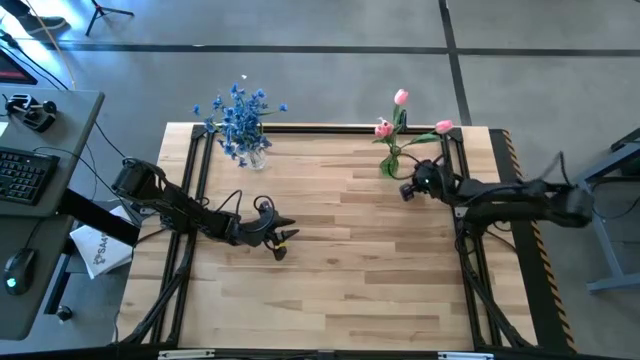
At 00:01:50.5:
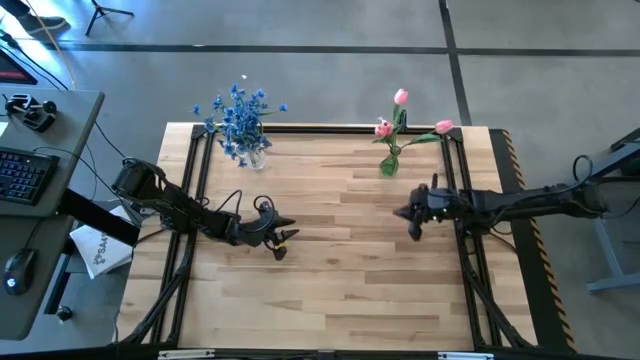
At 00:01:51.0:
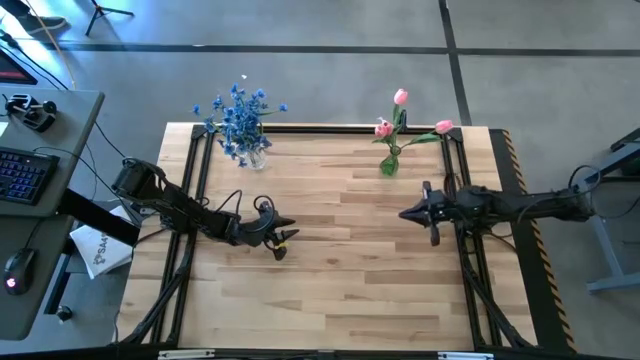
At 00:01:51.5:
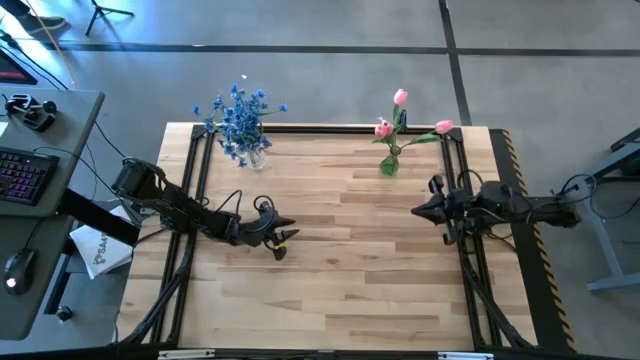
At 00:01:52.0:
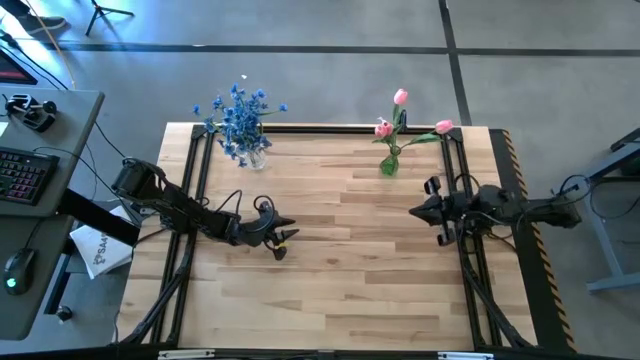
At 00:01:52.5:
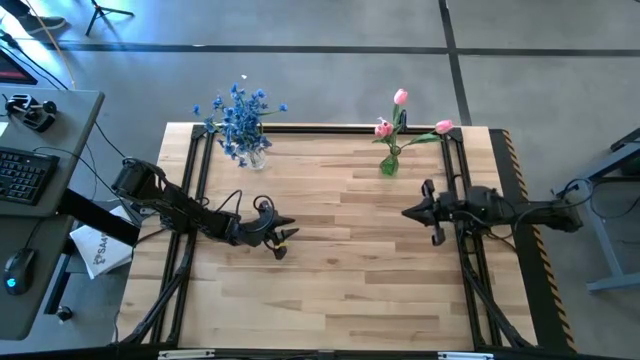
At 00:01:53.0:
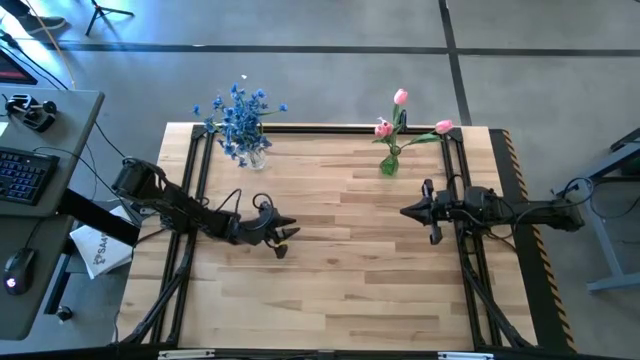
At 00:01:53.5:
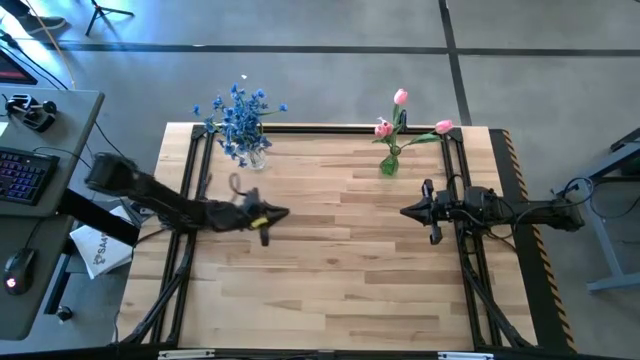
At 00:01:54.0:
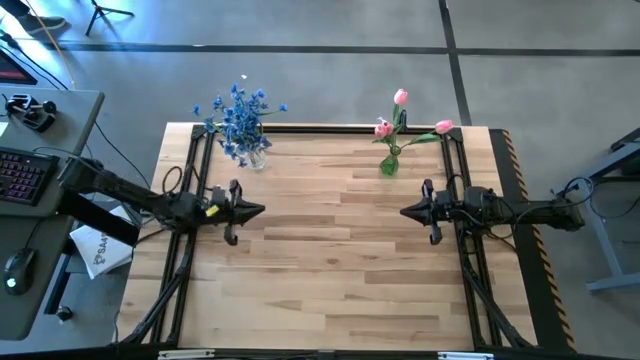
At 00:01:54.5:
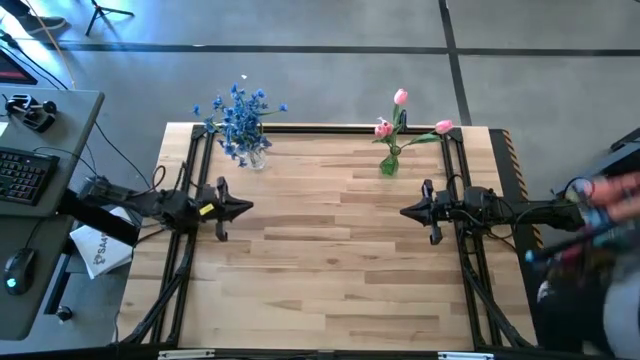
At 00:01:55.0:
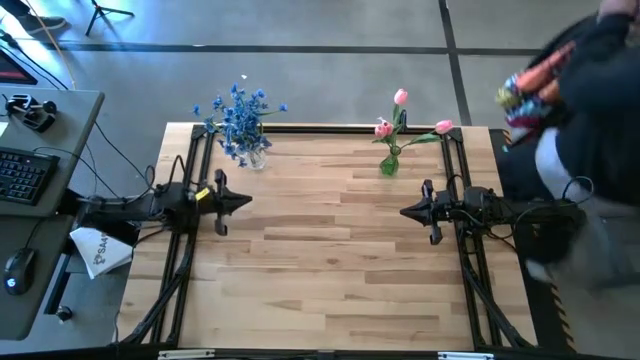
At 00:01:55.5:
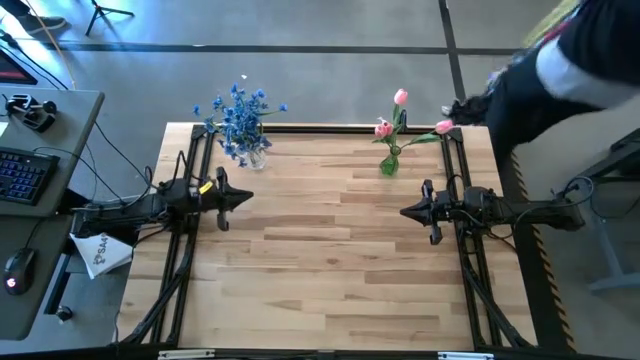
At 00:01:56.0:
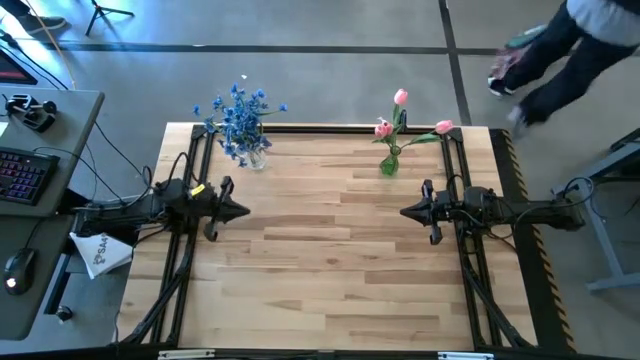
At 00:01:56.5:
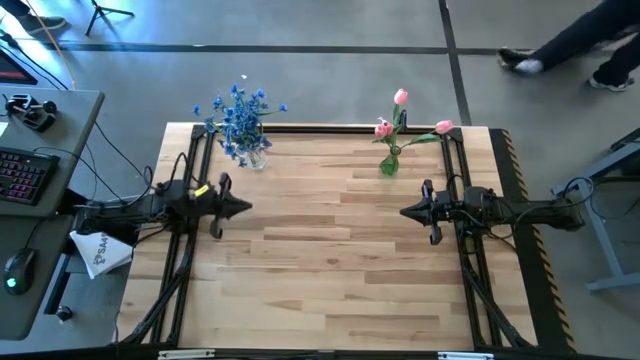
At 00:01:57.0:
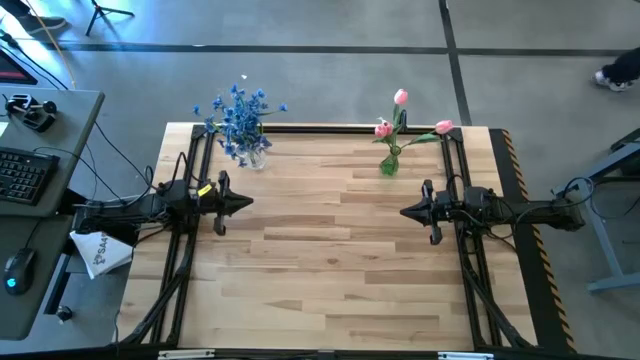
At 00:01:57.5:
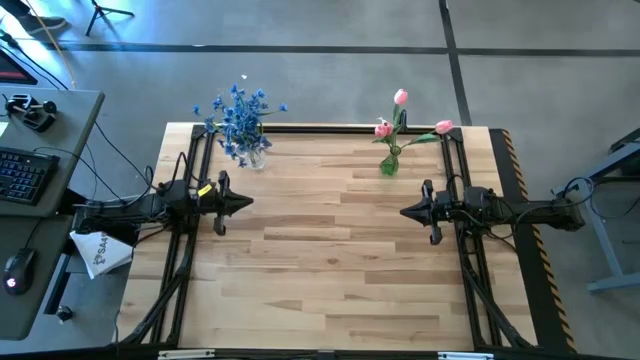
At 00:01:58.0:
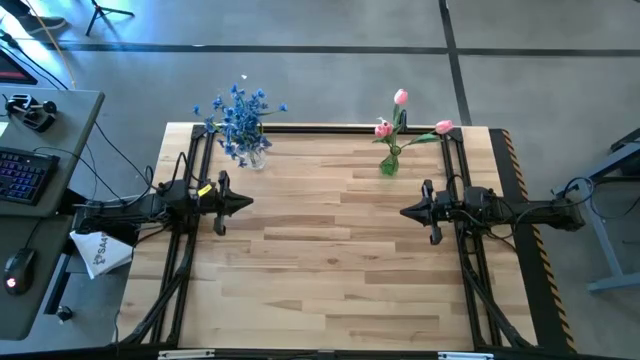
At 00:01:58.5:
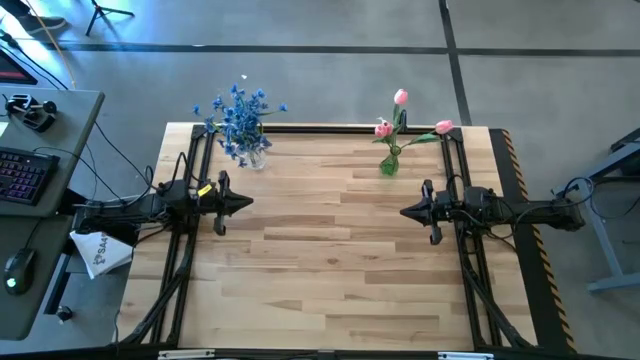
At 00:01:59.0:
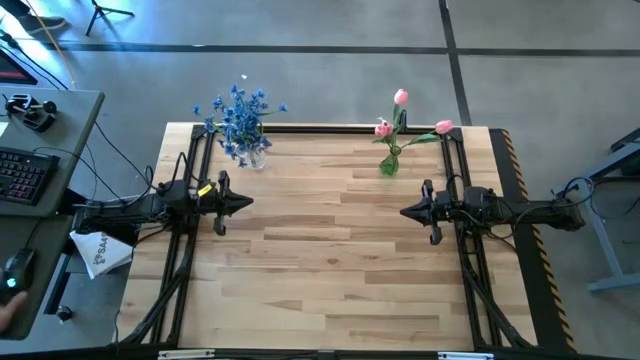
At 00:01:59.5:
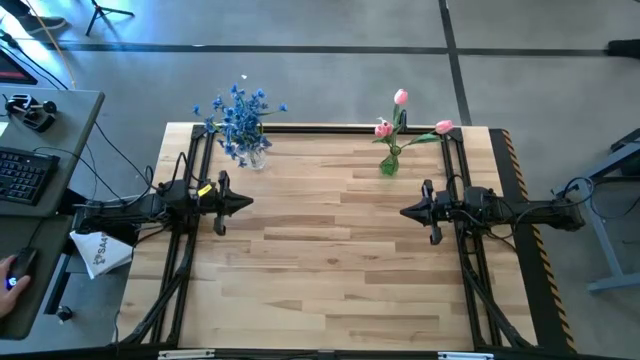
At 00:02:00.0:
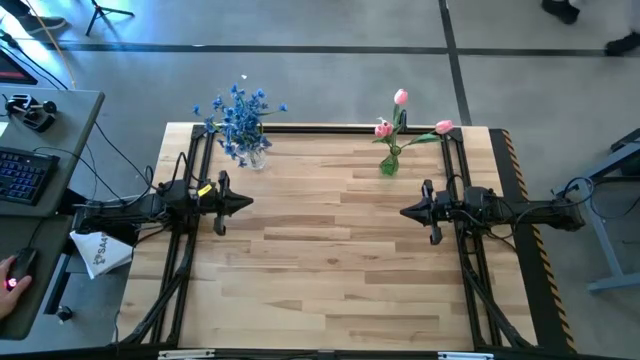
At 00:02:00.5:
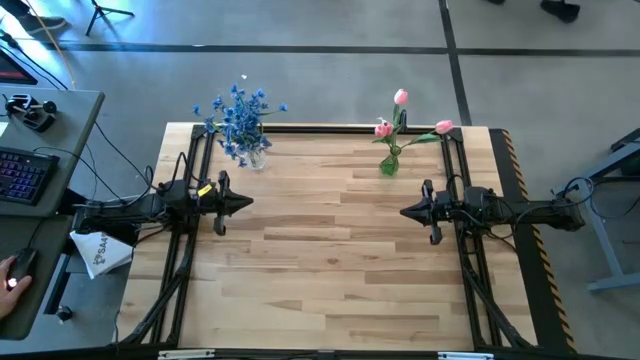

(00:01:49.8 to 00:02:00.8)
Task: Sort flowers into vase by color
Return to Home Position

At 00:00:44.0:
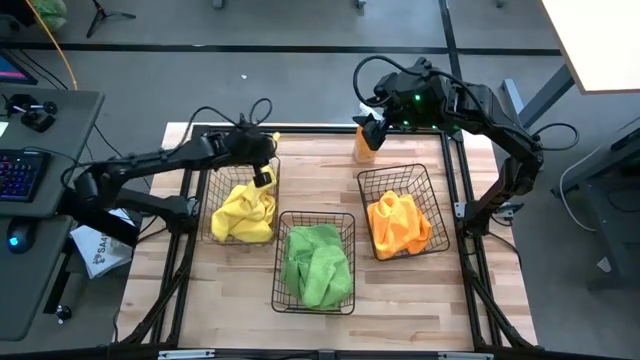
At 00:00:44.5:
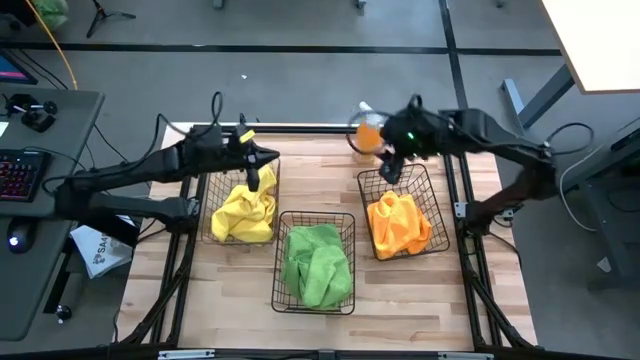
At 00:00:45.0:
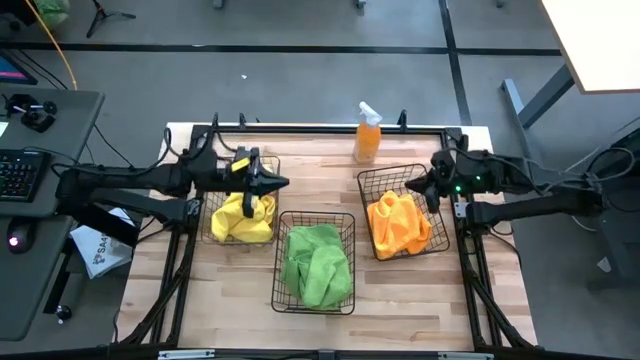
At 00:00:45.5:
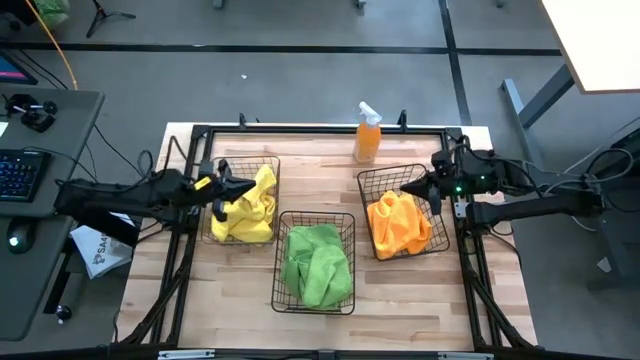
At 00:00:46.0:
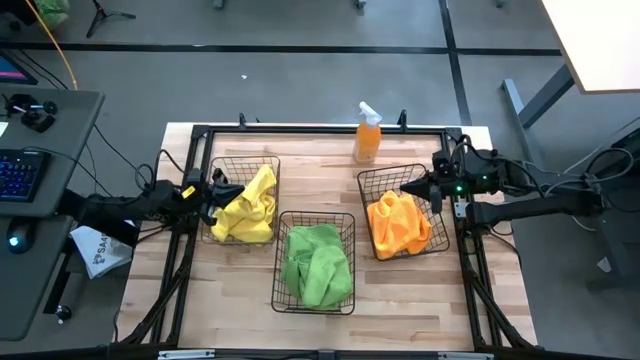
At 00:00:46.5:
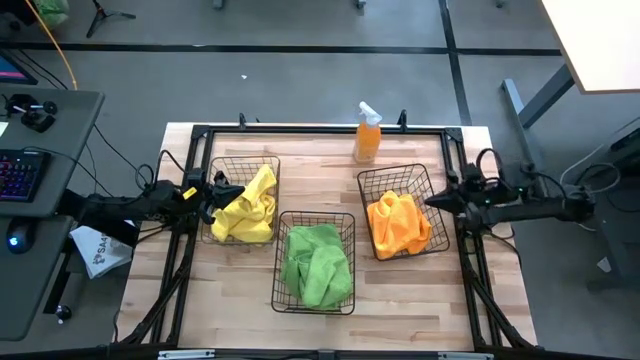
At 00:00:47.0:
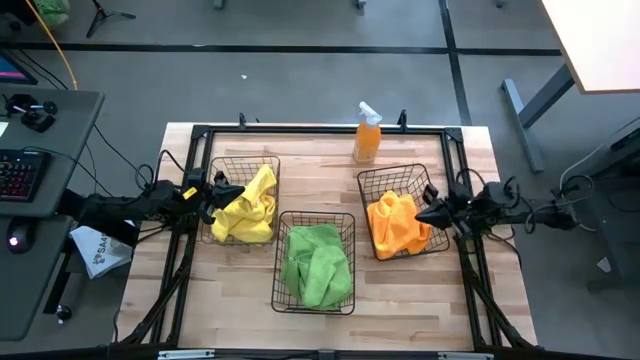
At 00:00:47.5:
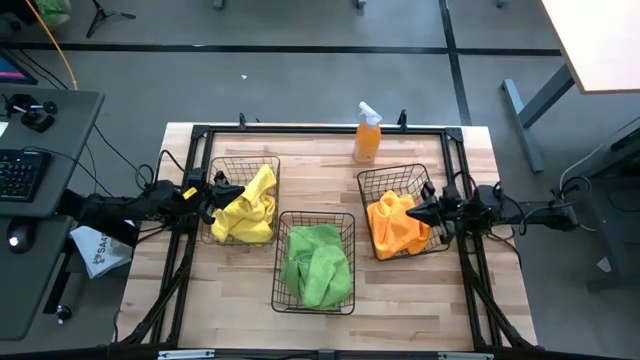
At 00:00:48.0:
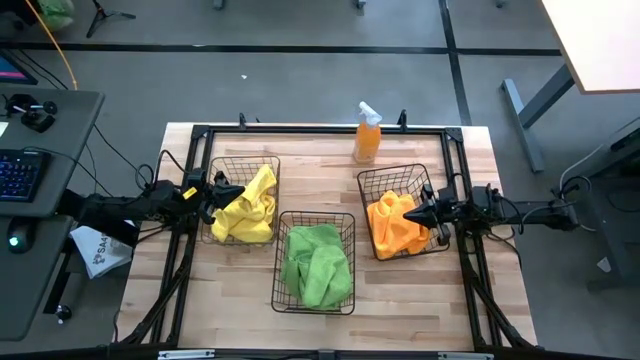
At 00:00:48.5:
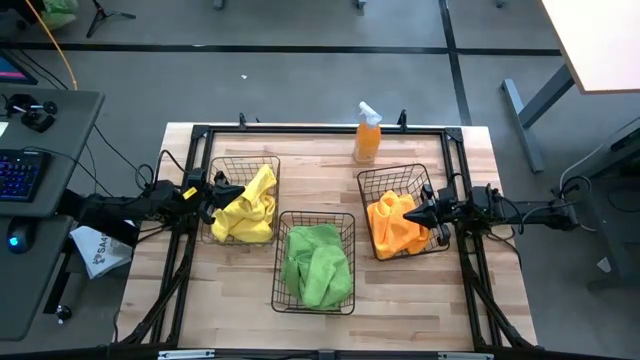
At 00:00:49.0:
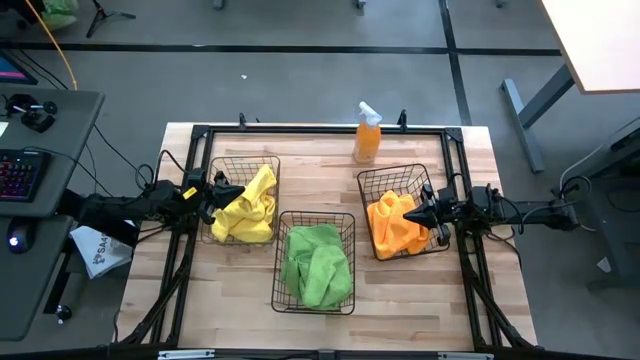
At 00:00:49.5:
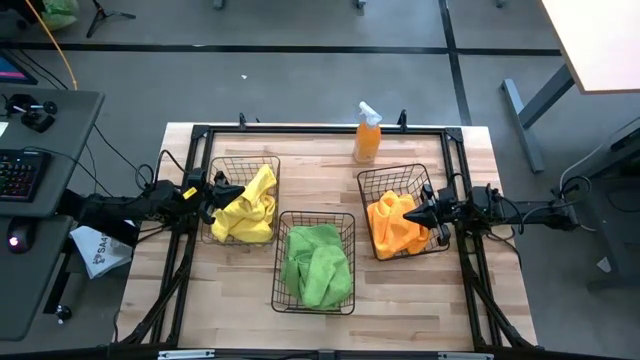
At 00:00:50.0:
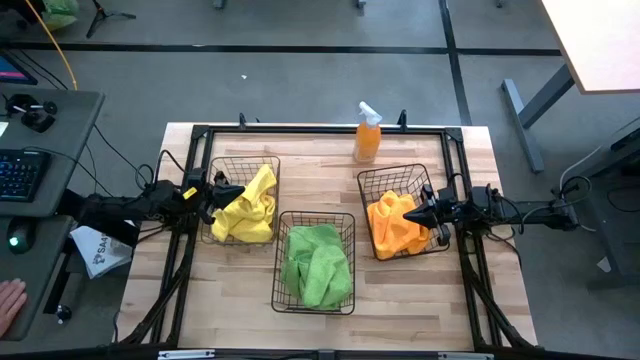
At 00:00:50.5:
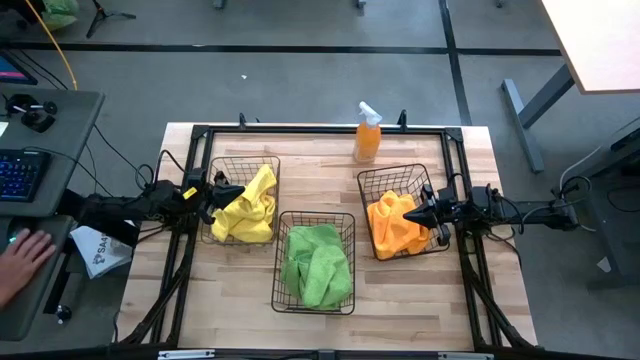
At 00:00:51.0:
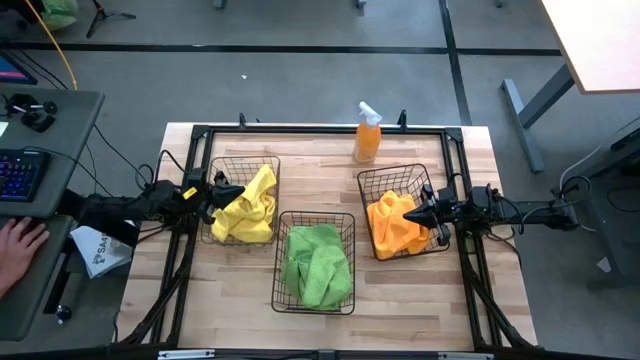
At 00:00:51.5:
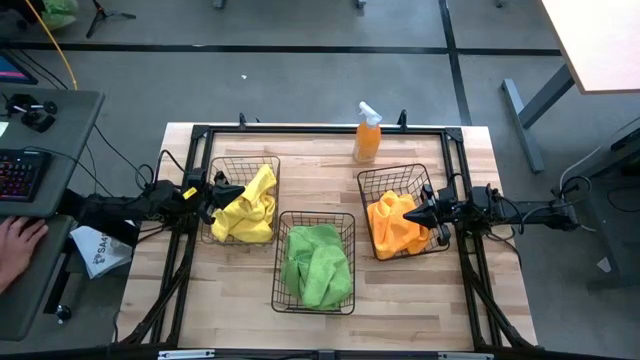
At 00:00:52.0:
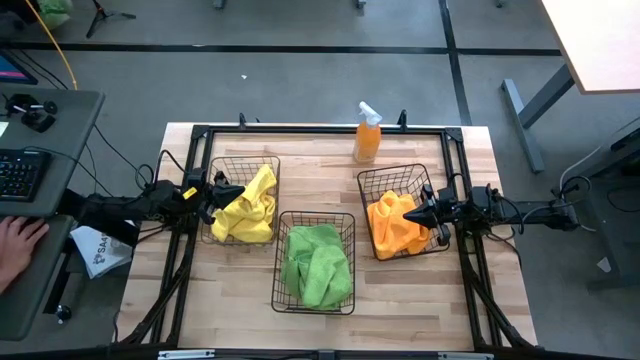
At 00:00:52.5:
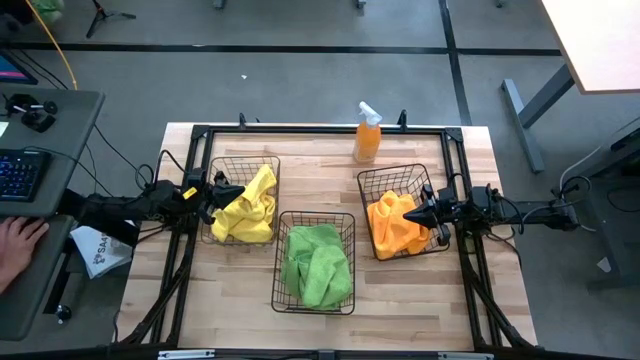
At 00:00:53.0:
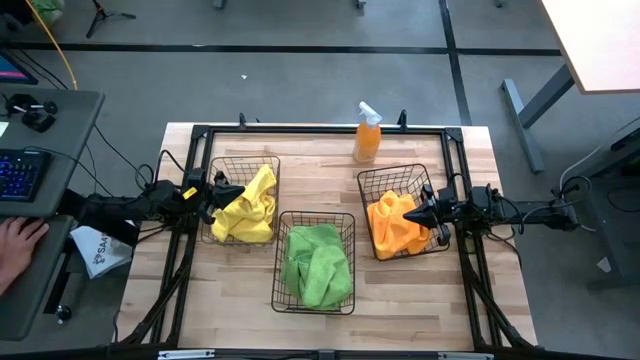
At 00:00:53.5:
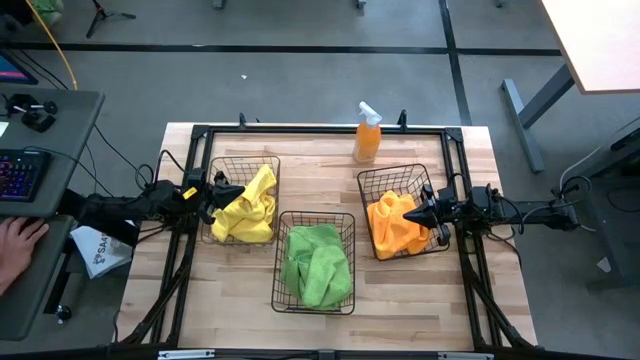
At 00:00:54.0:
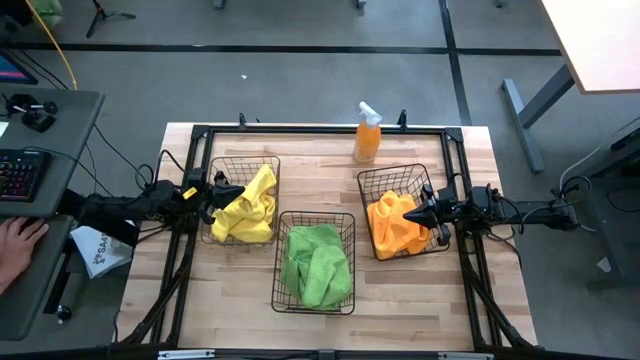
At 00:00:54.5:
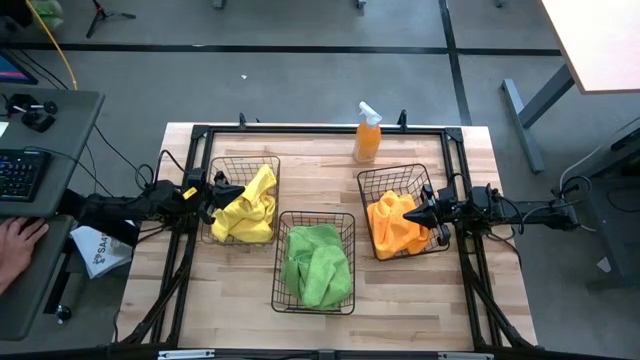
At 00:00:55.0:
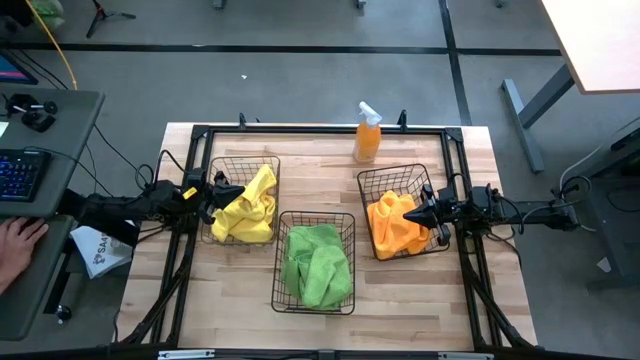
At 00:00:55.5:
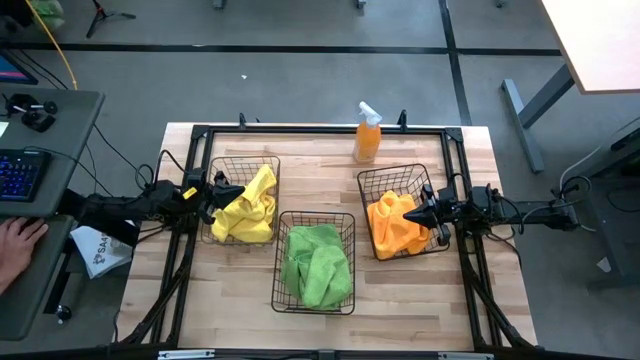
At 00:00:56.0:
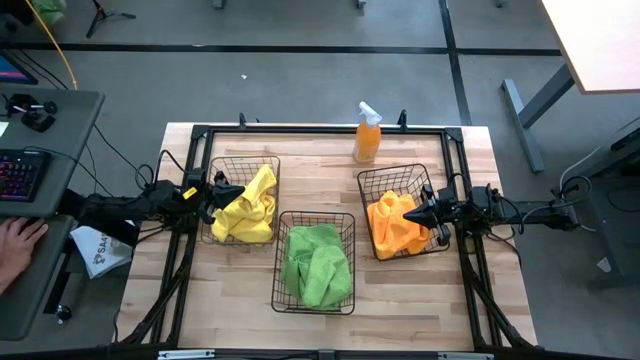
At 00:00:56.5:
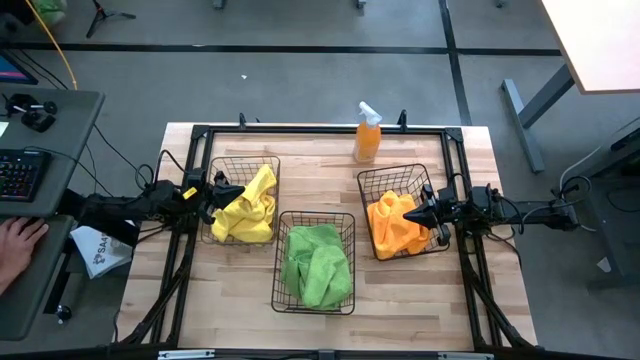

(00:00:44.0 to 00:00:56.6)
Task: Sort microfiber towel by color & place in baskets
Return to Home Position
